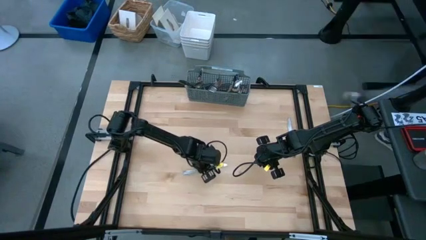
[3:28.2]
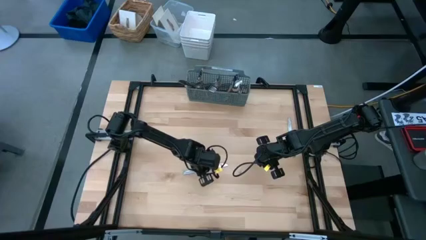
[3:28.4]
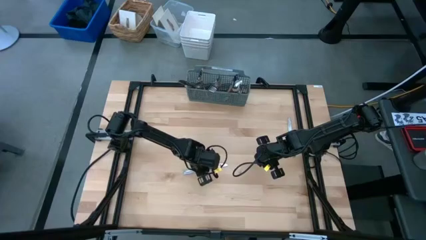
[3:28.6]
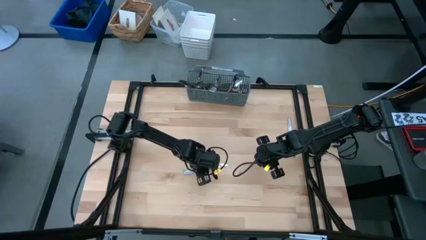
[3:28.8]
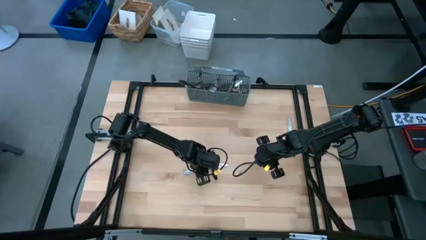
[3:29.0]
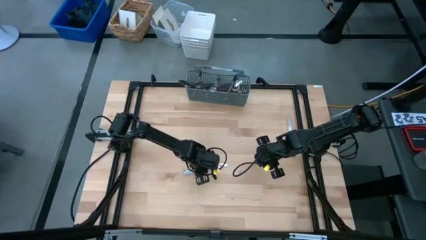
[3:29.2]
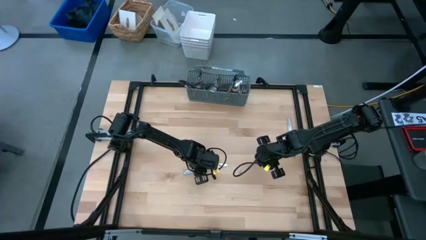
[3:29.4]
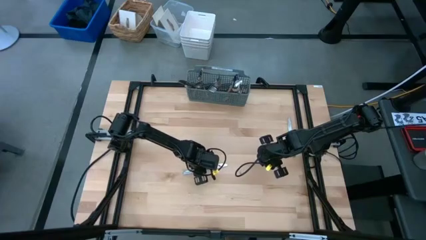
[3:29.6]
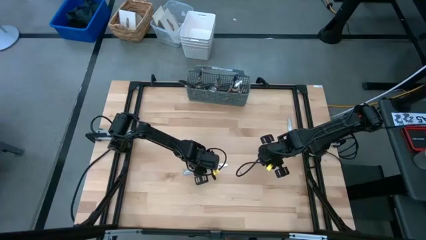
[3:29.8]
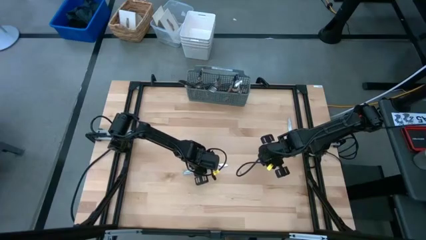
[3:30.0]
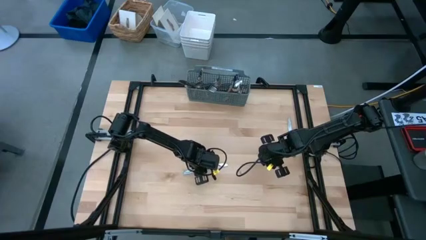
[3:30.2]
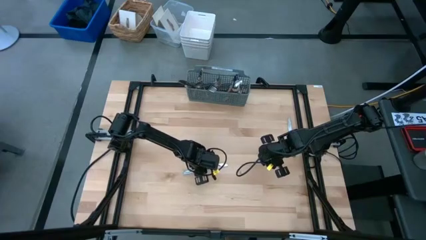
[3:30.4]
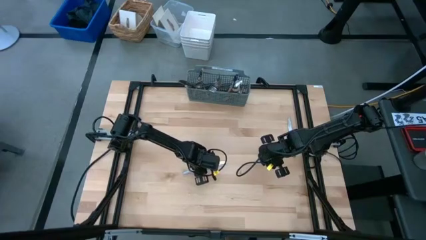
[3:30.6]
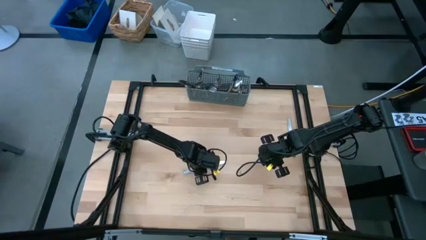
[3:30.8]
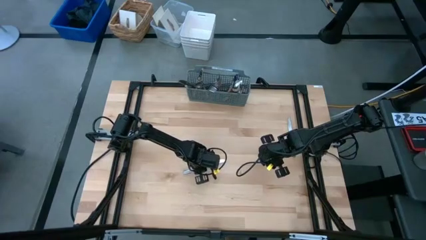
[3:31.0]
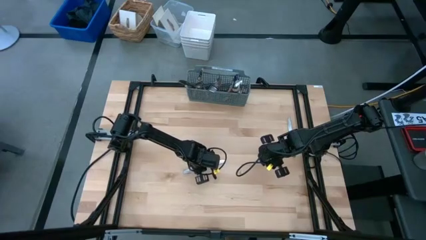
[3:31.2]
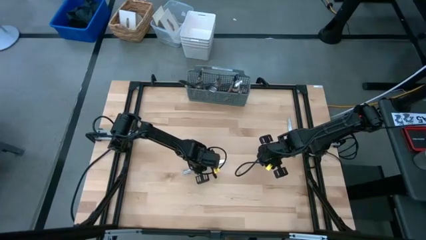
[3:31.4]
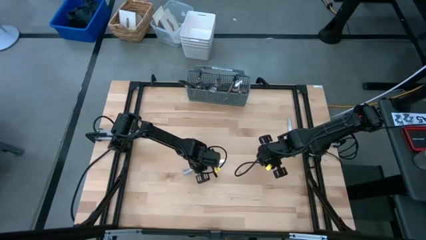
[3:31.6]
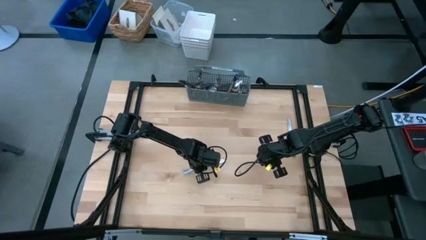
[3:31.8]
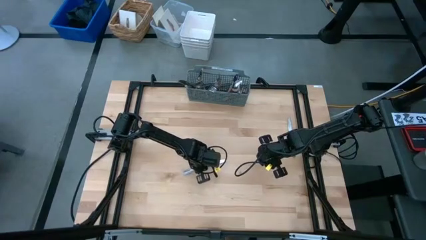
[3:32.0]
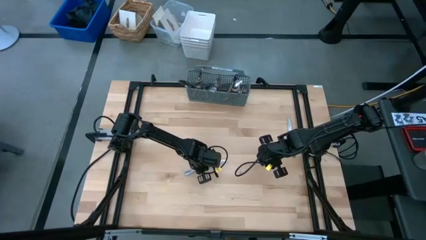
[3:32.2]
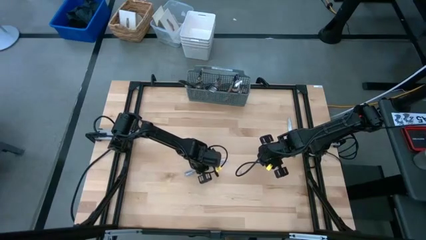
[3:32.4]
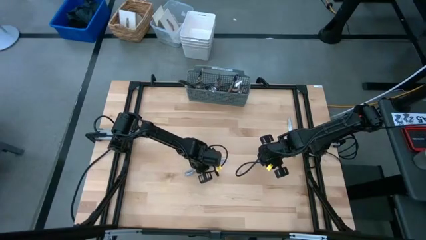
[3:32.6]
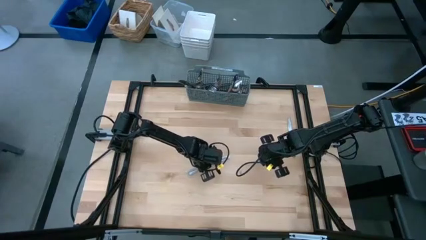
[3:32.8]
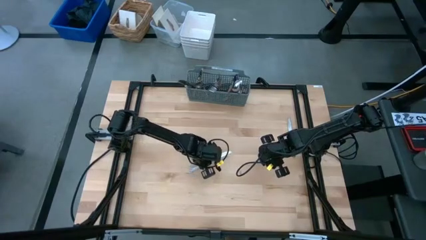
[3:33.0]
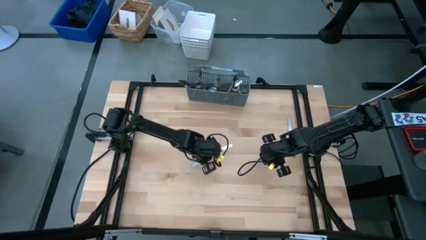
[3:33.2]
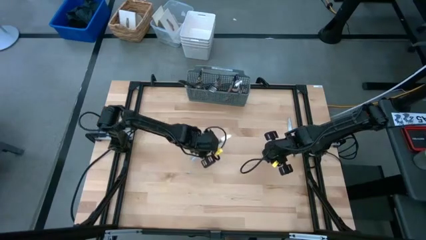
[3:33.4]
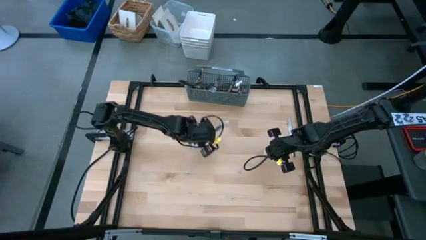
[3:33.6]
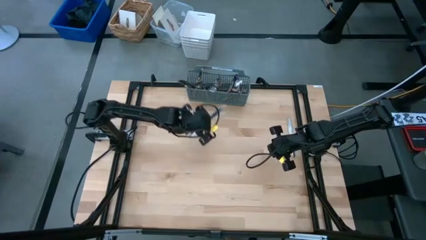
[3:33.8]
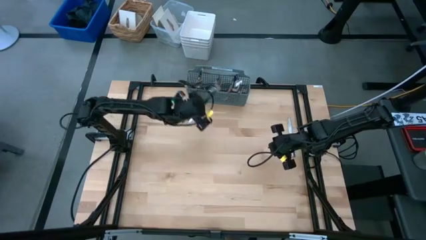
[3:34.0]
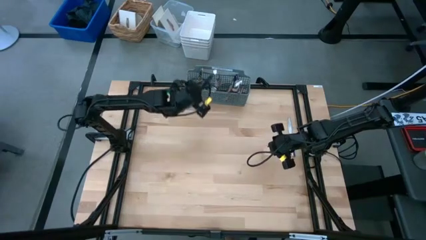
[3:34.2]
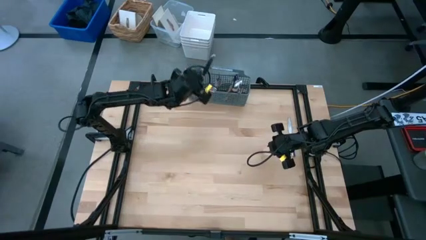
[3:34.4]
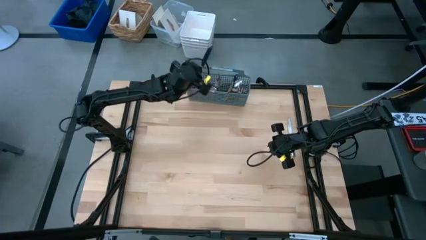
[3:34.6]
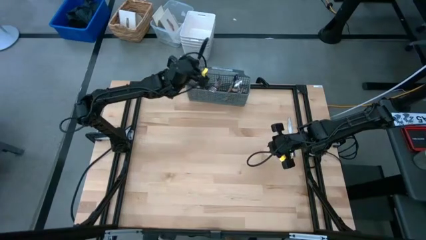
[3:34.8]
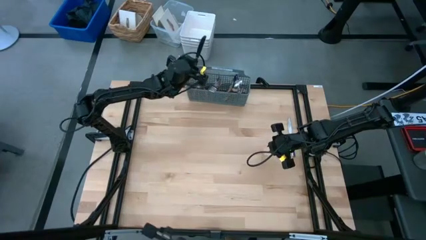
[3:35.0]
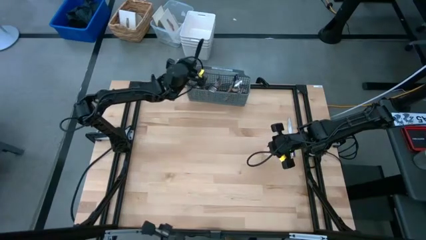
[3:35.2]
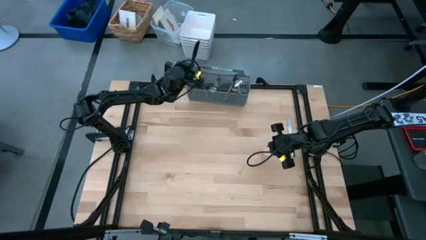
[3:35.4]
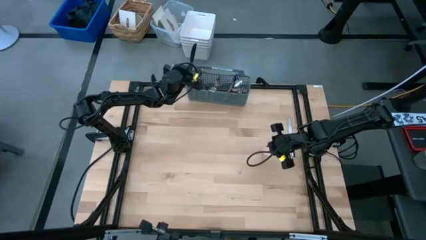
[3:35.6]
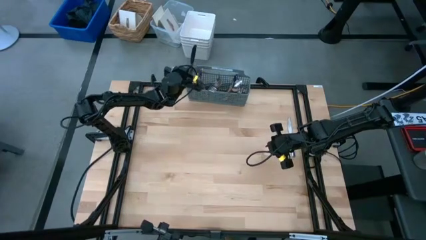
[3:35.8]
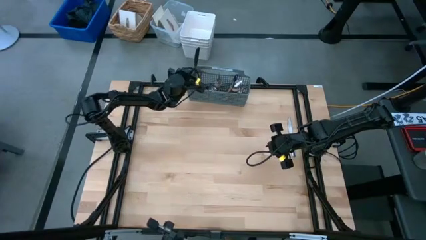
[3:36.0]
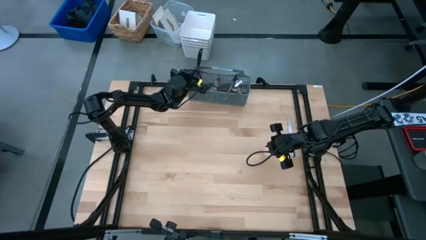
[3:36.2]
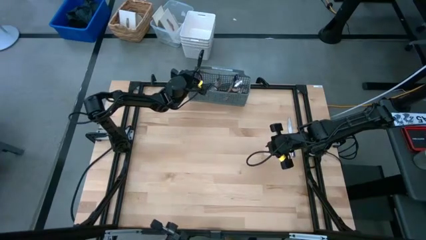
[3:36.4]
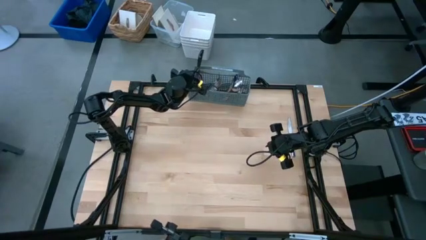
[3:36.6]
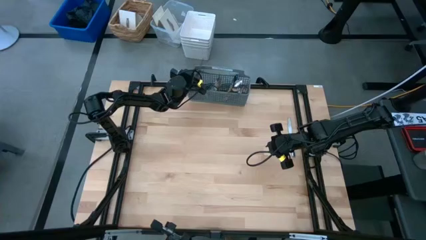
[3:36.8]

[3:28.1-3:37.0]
Task: Sort silverware
Put the table knife into the gray silverware organizer

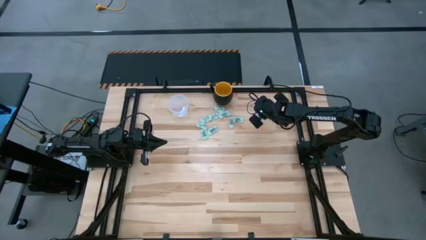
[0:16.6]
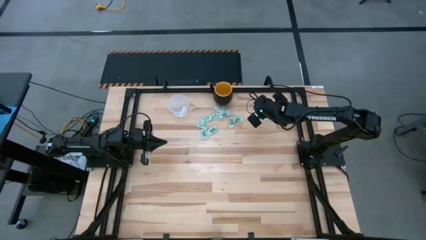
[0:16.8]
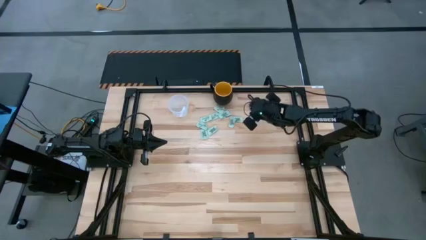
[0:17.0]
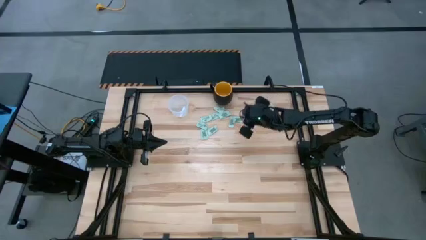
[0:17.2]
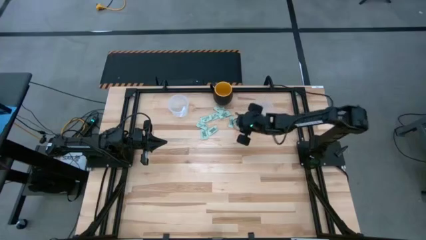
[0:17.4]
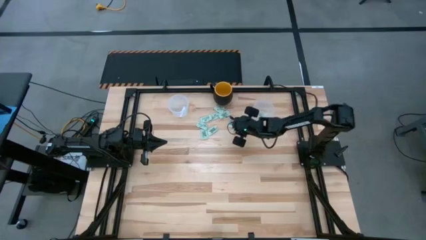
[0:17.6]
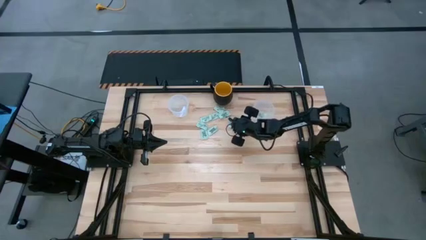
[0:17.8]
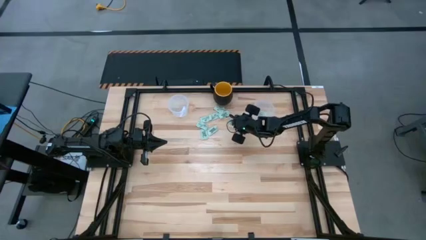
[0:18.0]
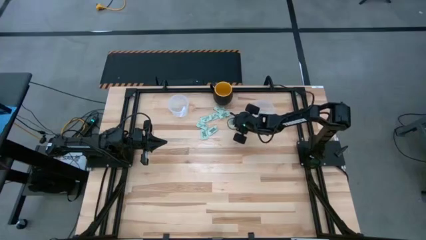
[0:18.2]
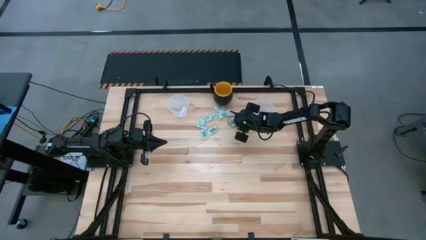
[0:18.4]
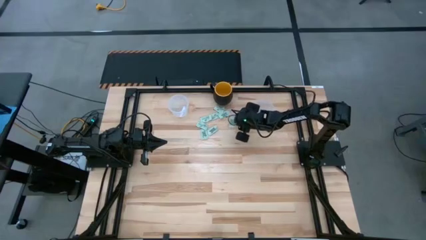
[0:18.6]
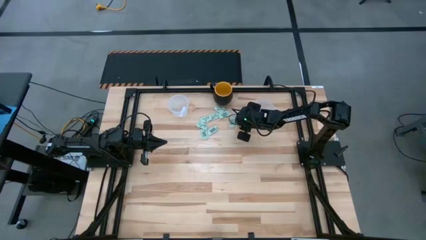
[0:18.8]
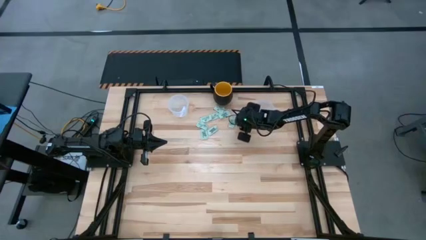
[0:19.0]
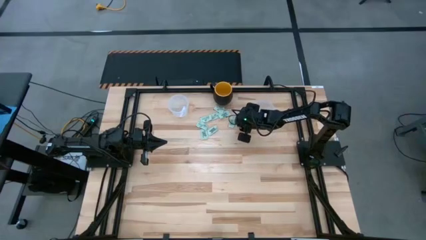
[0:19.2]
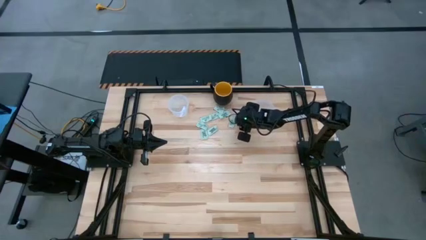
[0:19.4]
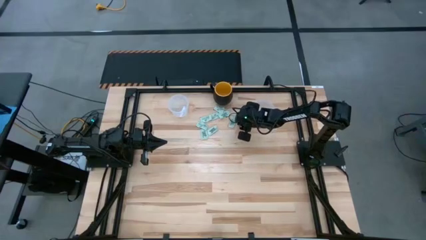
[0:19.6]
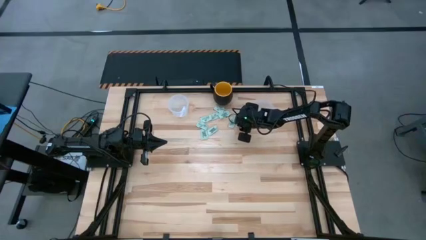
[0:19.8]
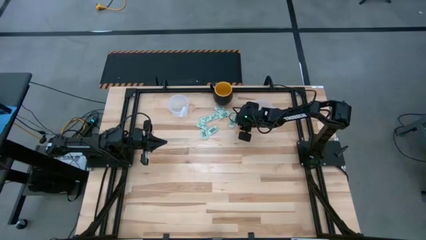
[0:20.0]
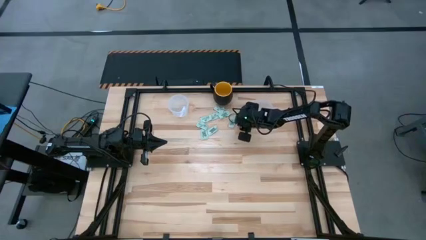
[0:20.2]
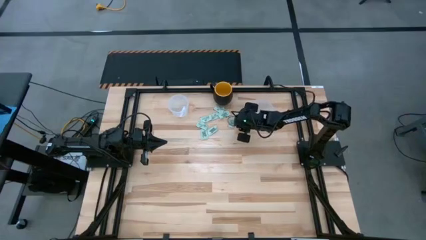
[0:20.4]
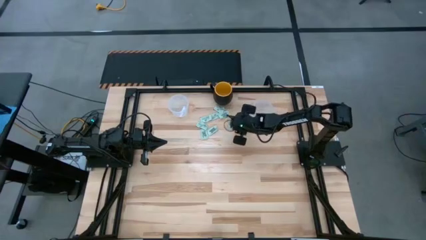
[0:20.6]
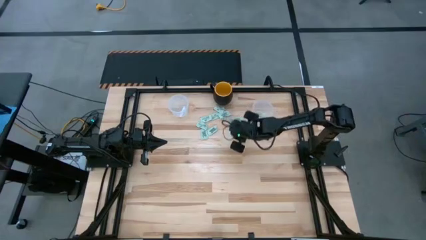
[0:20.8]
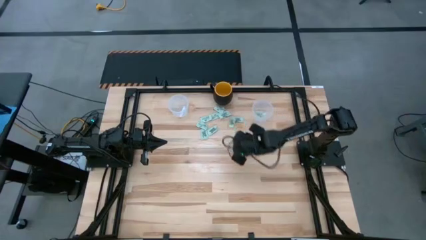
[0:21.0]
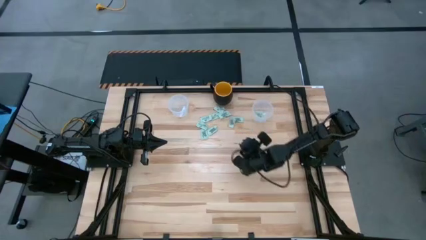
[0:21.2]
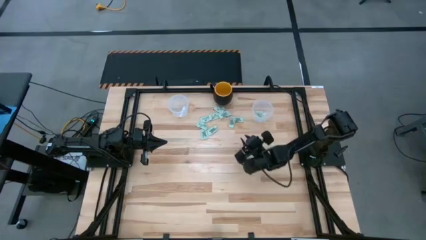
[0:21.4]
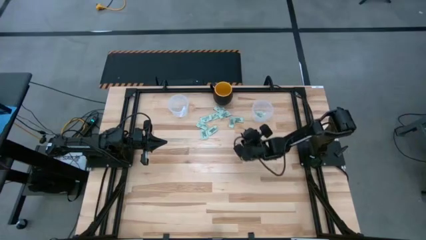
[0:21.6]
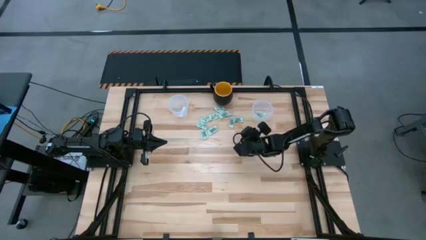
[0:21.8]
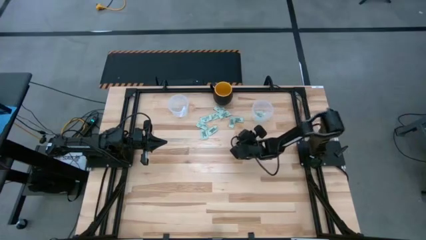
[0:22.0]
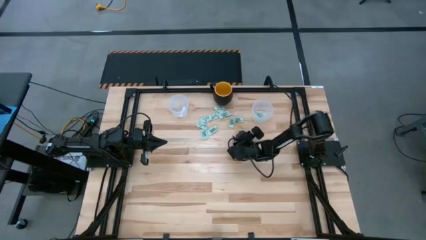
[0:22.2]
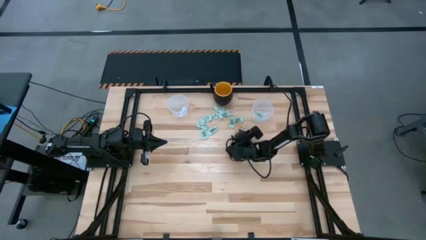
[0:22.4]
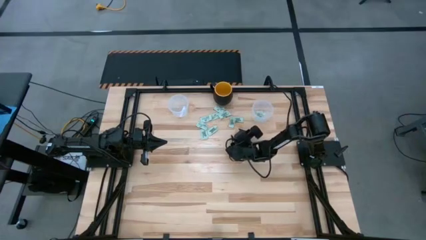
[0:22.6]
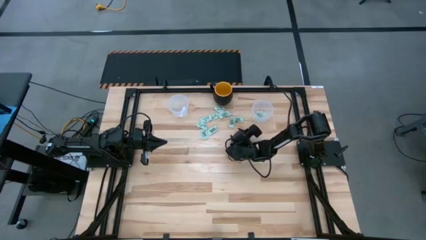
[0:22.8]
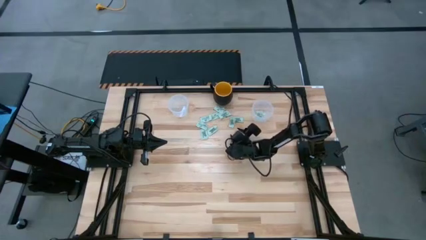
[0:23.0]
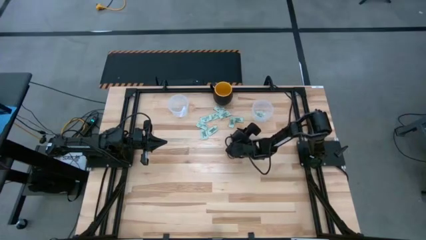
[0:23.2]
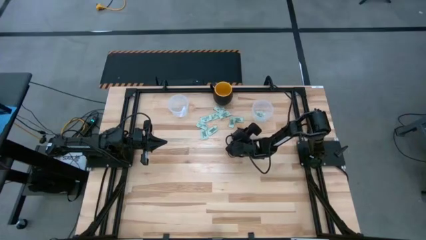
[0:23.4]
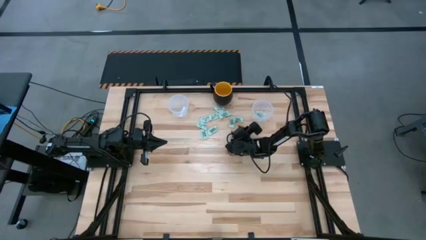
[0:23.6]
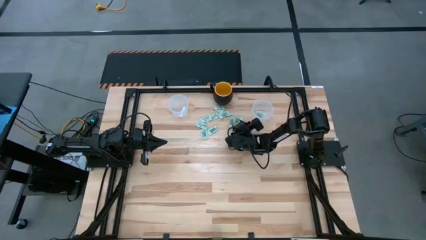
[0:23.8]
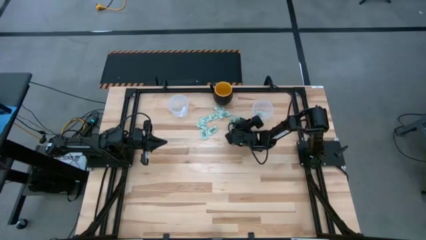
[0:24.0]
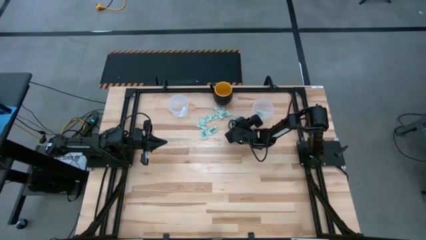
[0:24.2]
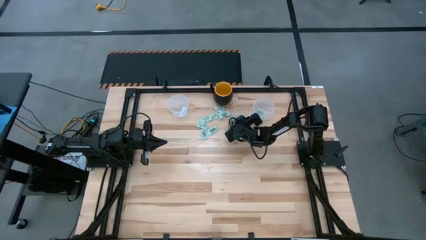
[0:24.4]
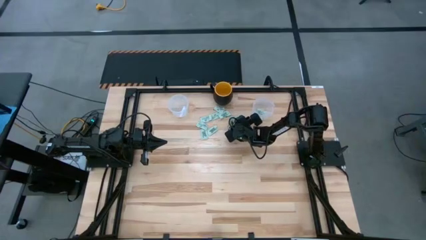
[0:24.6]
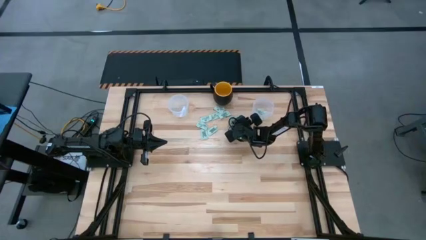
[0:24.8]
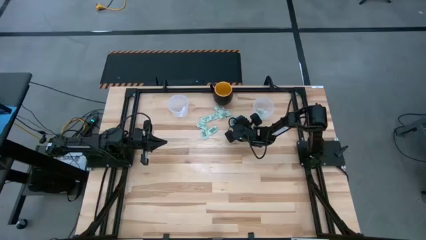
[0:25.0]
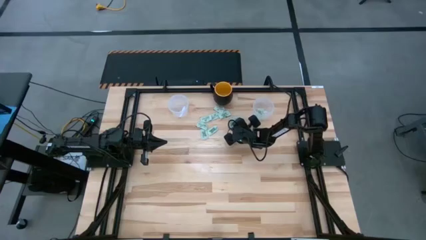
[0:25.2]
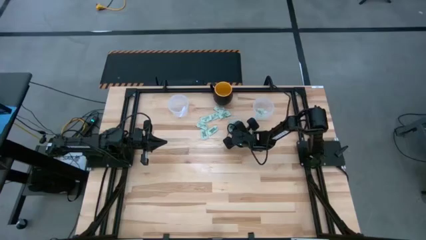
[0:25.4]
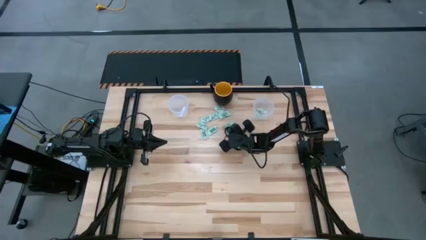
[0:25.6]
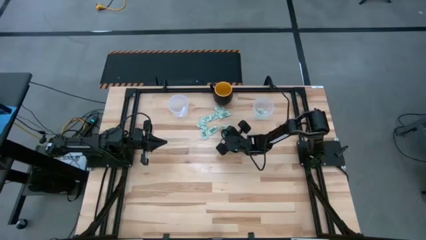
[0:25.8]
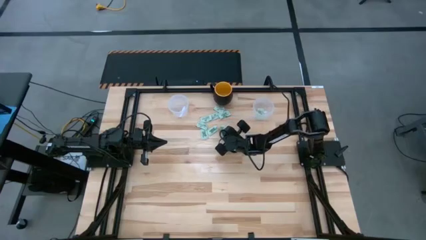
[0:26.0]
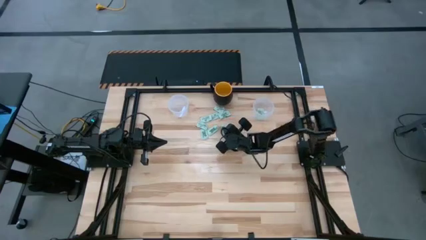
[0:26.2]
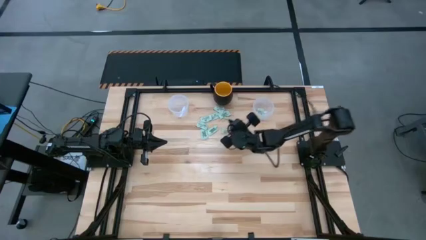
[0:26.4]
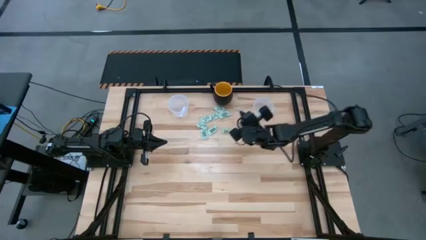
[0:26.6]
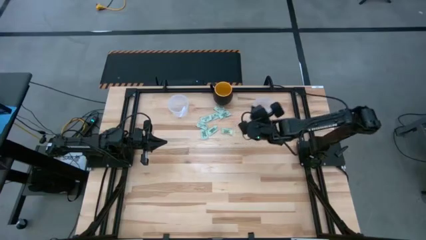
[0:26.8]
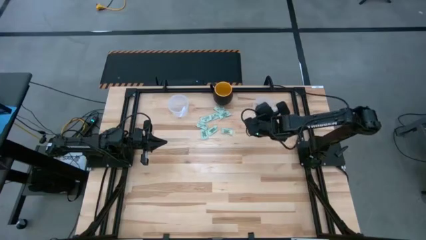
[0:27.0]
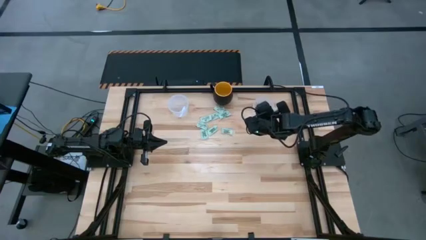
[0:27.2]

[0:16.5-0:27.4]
Task: Pick and place Stevia / Truvia into bins
Put the stevia packet into the right transparent container
